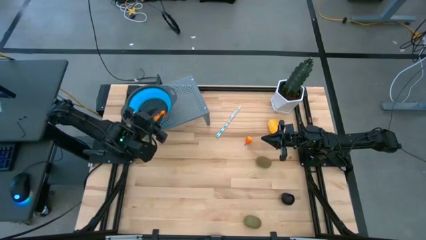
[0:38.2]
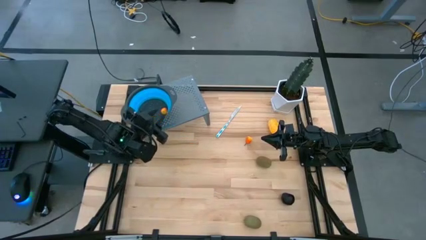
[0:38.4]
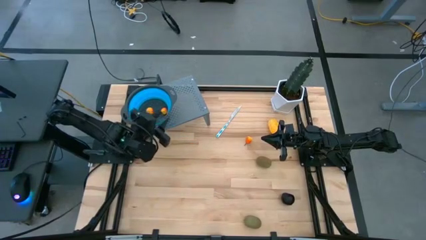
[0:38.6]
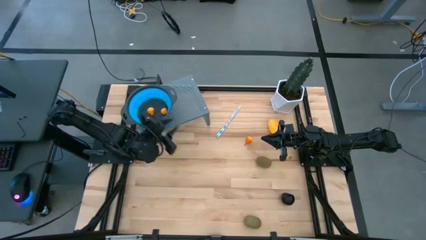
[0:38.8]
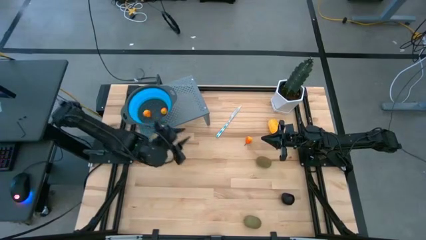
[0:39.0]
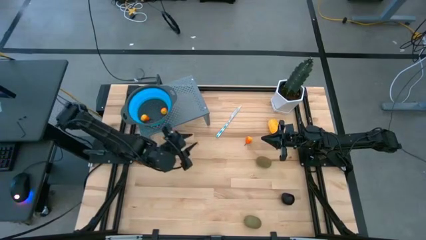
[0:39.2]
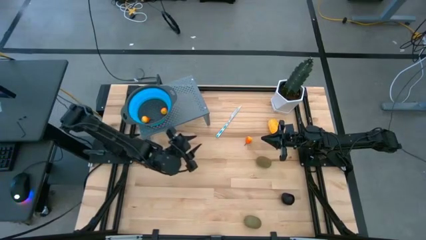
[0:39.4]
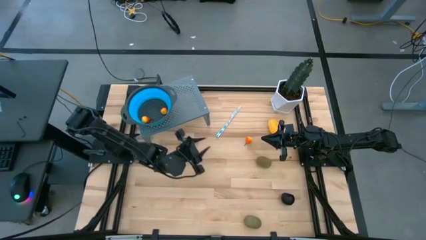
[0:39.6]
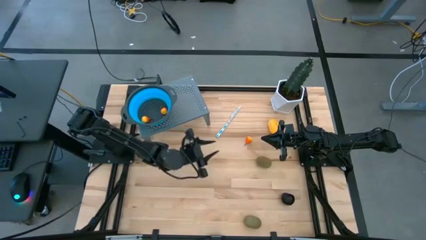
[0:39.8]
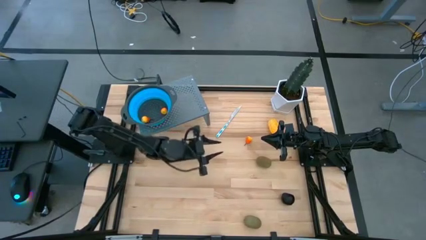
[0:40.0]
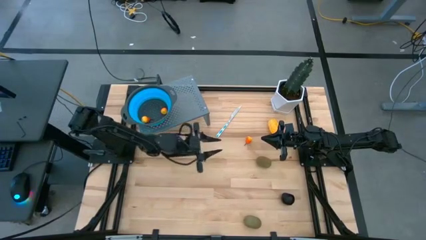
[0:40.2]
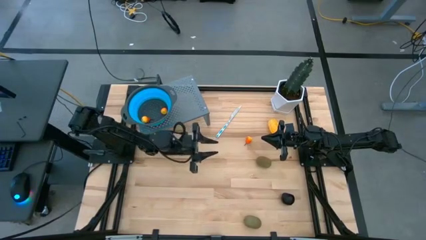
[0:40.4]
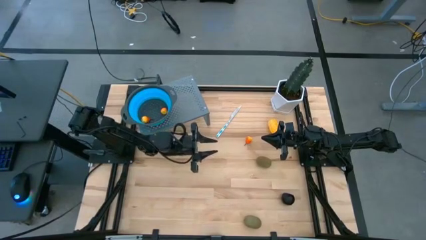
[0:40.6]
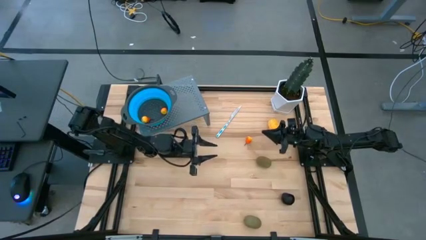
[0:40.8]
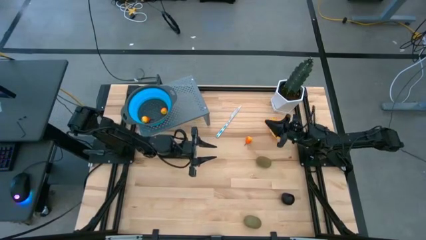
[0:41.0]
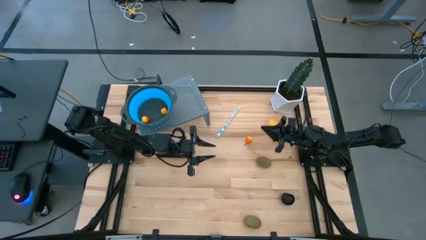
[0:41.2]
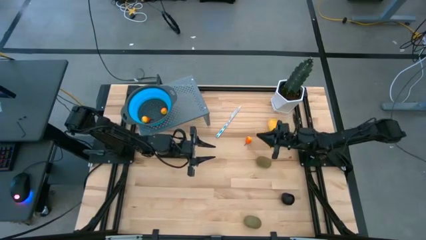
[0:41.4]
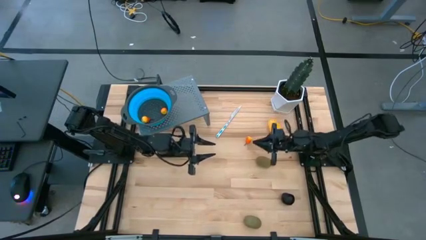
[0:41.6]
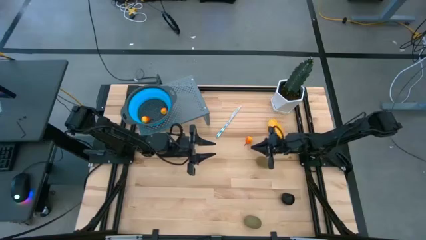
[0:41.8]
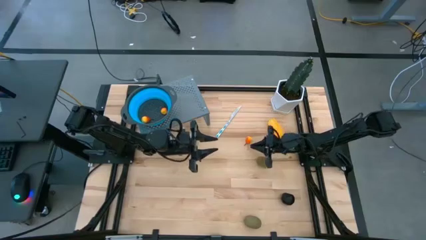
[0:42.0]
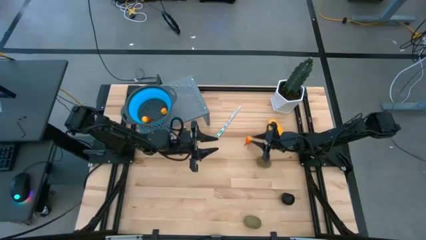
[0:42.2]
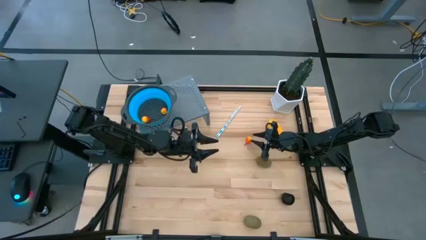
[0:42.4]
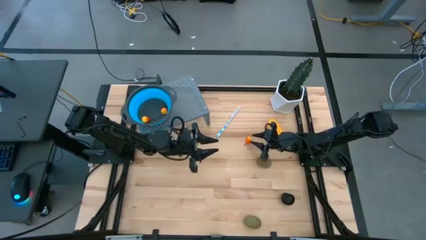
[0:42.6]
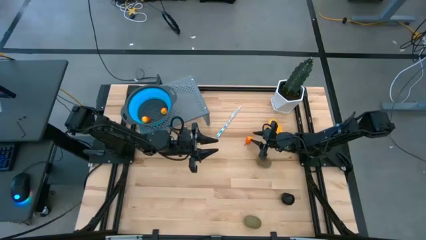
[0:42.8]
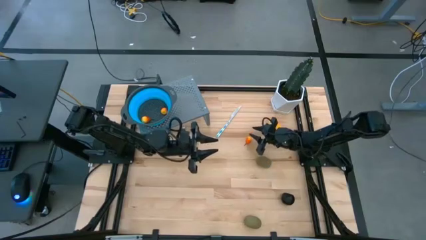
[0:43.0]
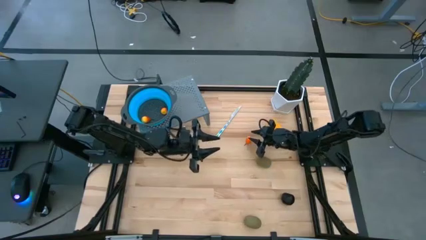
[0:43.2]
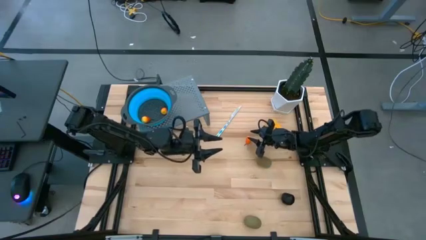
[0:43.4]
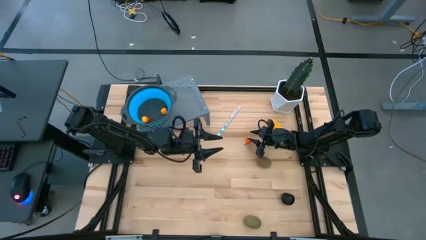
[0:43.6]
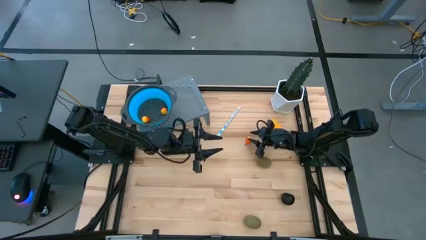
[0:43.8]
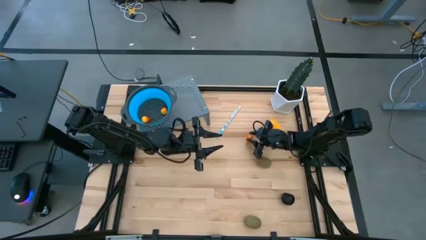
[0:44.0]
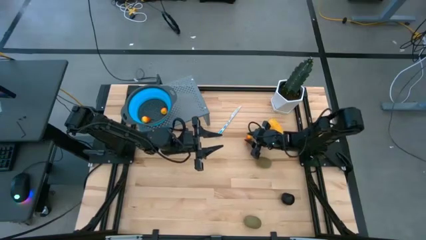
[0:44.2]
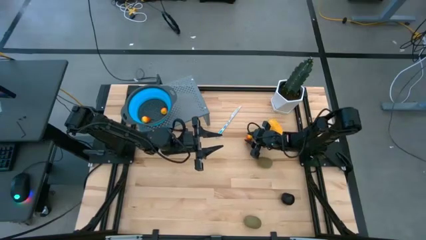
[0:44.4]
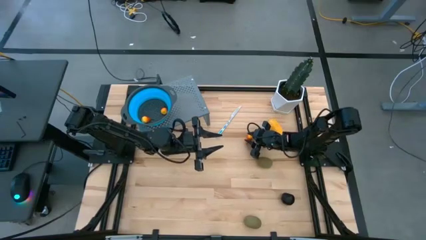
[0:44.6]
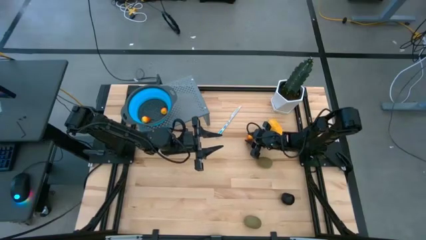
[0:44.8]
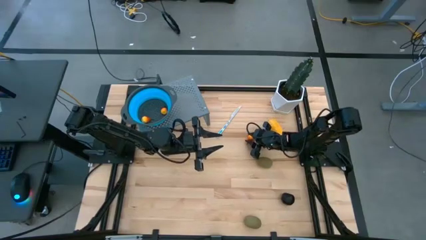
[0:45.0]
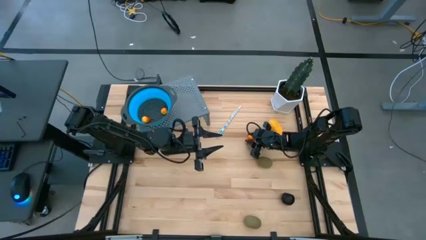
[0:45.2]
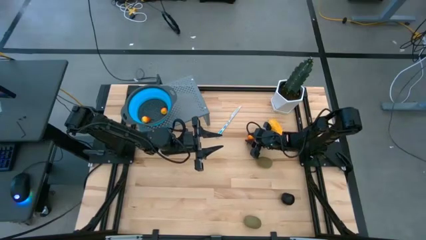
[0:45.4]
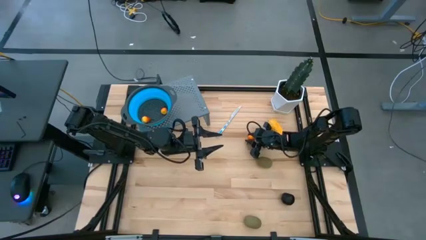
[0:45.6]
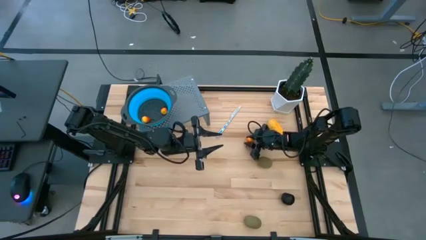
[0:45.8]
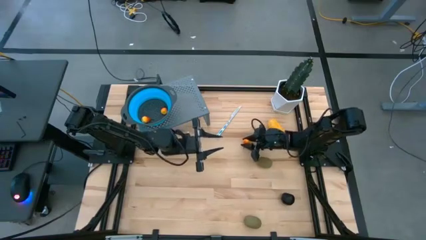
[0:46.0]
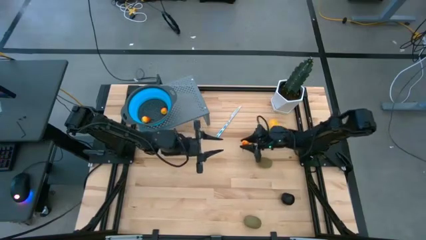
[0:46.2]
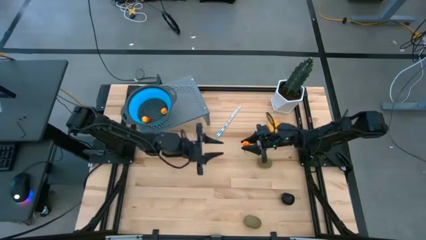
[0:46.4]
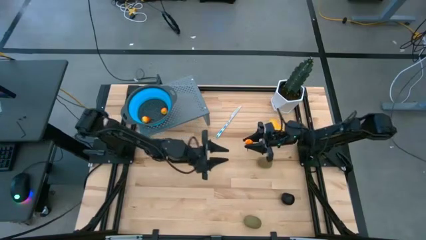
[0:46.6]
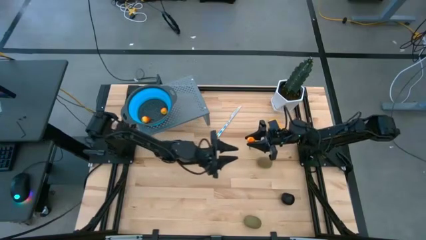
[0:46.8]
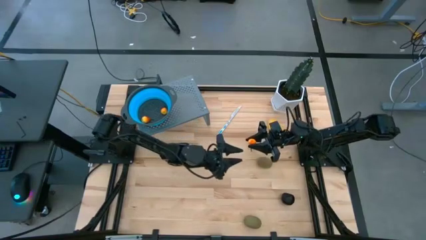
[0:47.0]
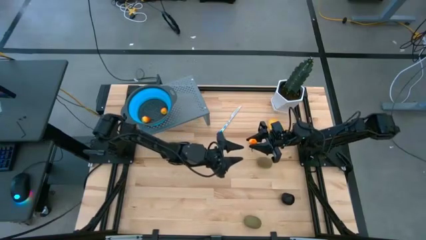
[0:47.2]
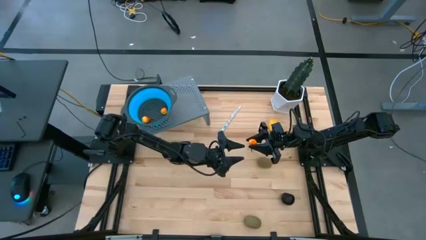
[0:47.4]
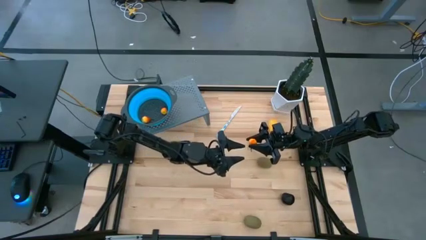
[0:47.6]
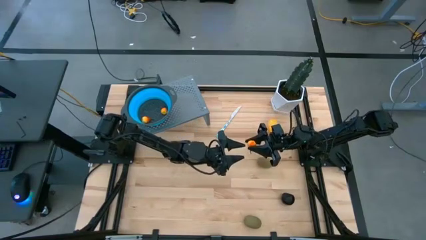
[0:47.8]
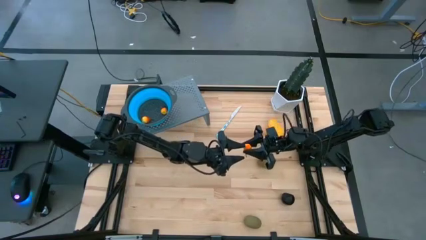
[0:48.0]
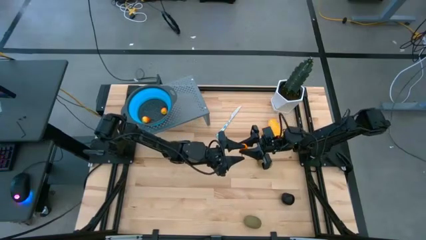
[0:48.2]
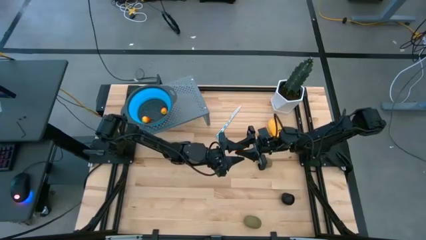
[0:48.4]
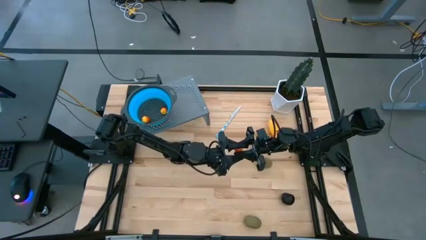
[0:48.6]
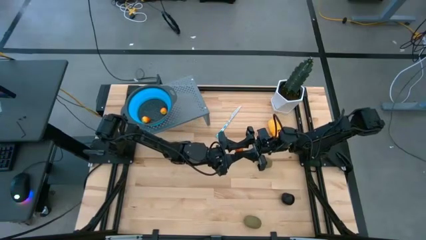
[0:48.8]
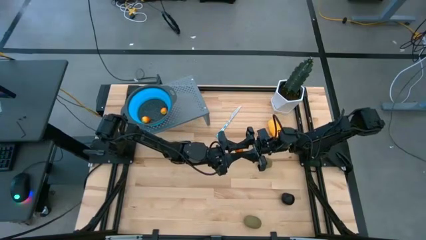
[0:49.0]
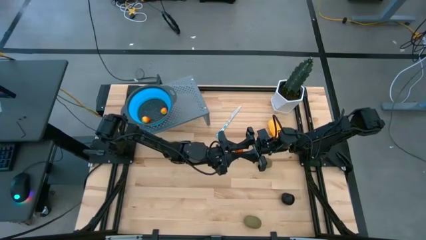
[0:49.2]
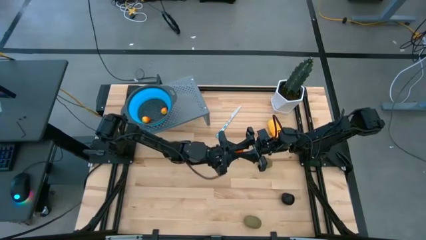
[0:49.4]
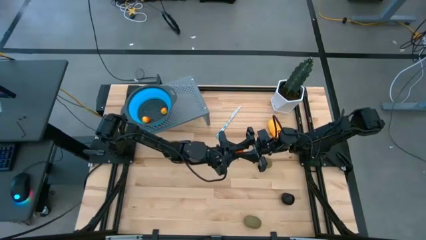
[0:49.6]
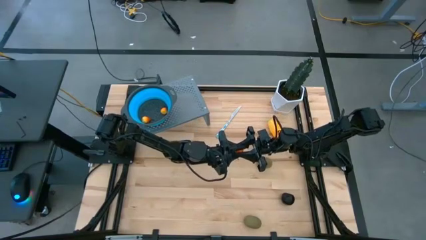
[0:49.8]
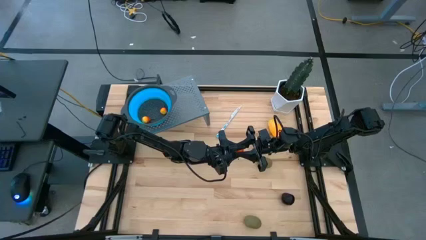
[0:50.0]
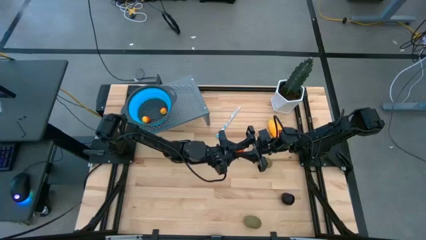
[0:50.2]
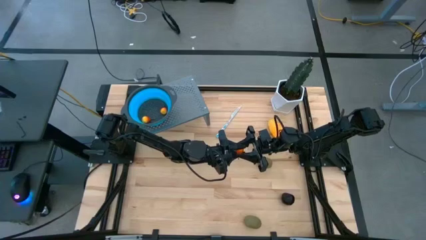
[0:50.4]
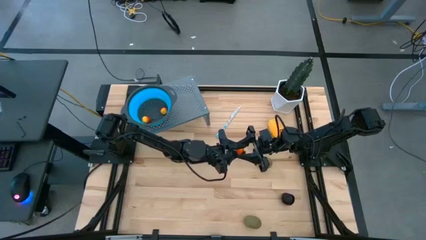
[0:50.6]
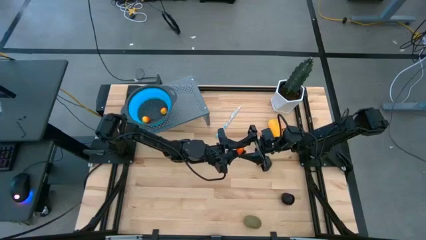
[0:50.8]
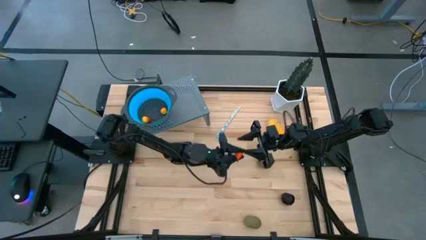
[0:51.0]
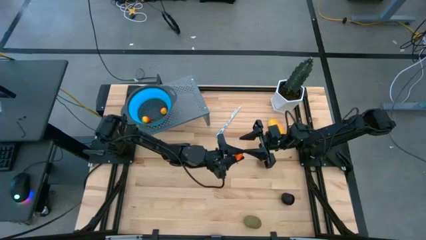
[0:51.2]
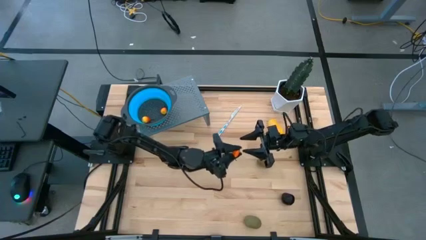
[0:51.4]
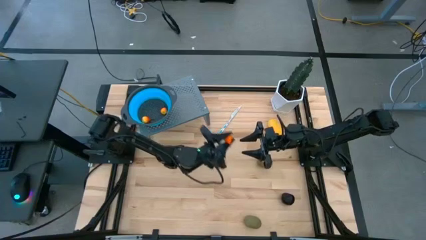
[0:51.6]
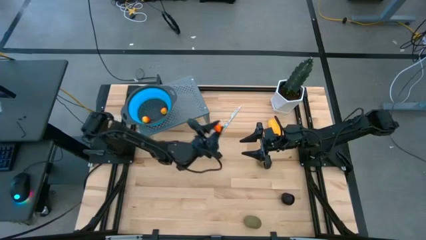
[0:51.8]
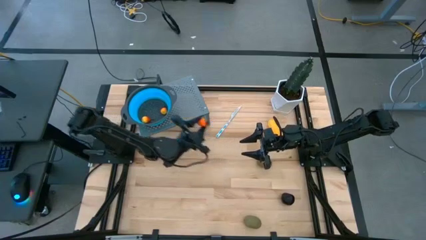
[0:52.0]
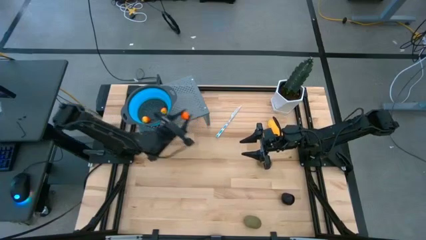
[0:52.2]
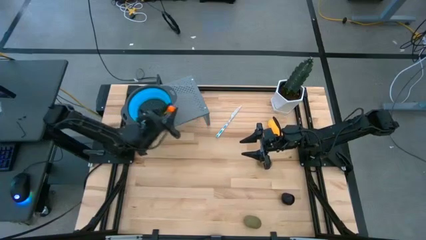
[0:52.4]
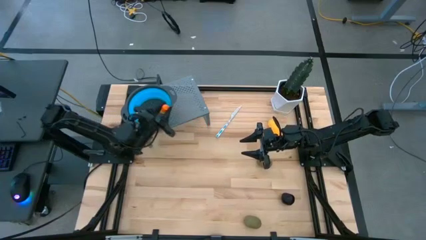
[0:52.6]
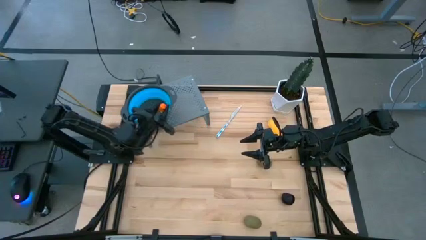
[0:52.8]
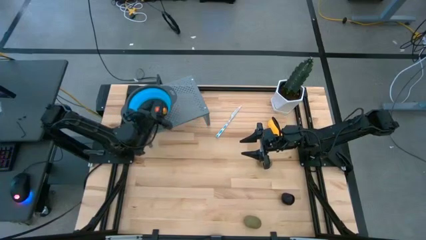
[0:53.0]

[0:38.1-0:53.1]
Task: Pick & Place Fruit
Put the right orange pear into the blue strainer bowl

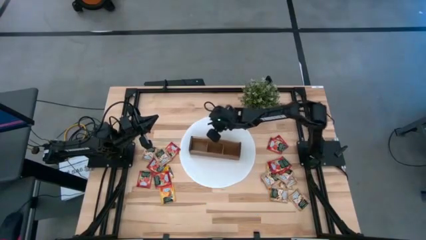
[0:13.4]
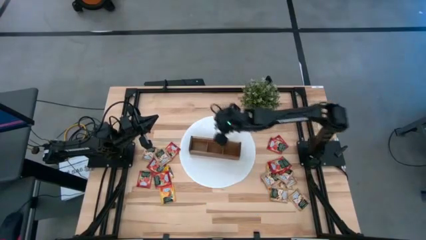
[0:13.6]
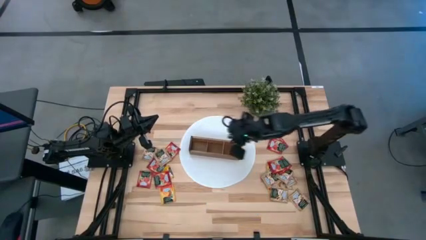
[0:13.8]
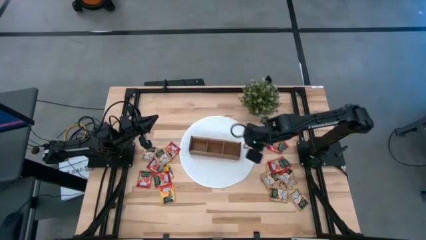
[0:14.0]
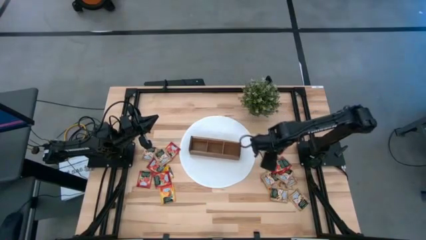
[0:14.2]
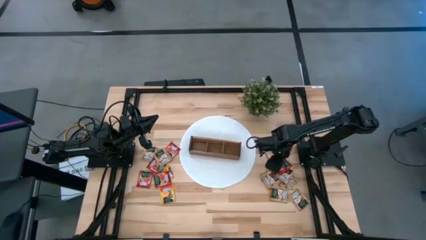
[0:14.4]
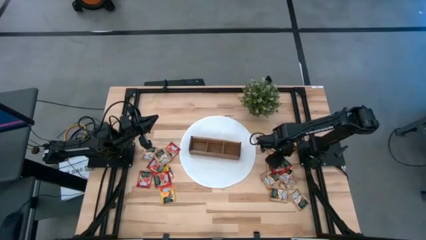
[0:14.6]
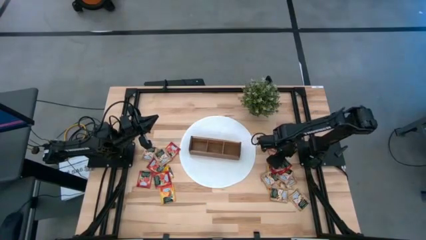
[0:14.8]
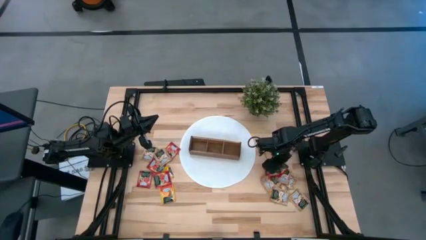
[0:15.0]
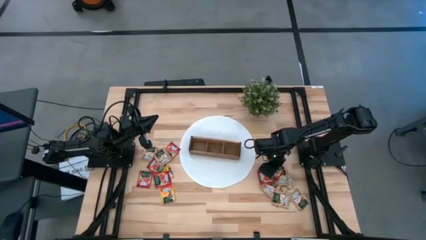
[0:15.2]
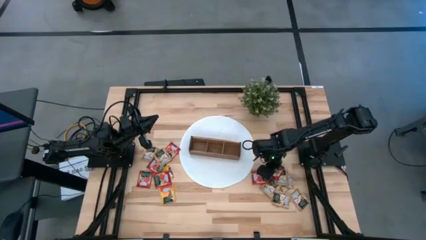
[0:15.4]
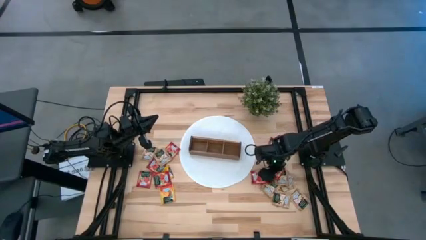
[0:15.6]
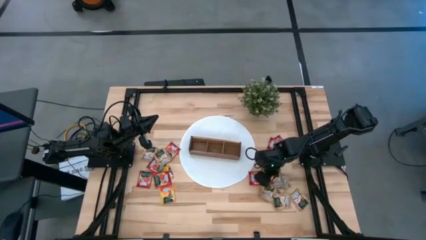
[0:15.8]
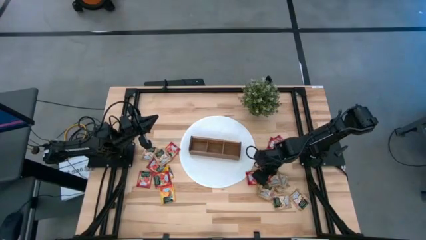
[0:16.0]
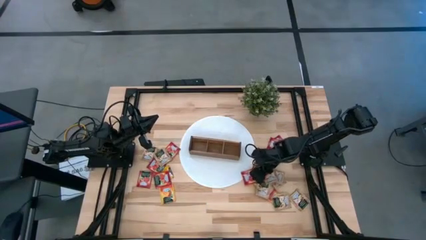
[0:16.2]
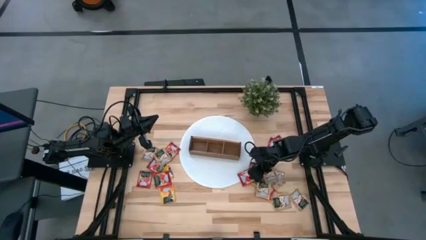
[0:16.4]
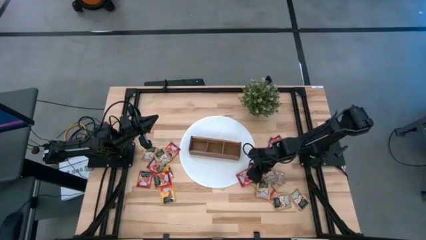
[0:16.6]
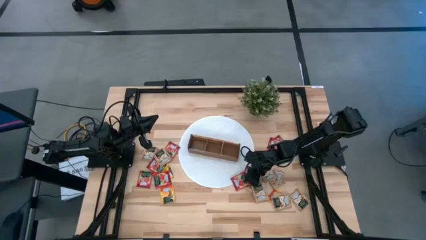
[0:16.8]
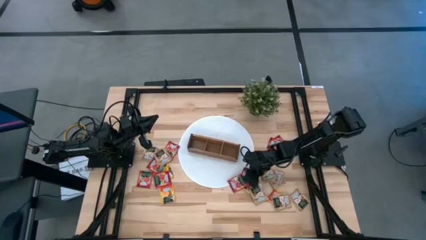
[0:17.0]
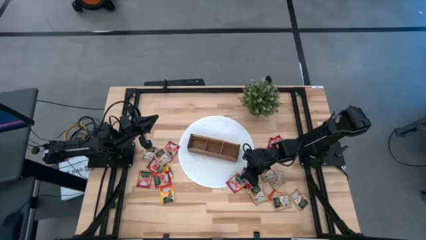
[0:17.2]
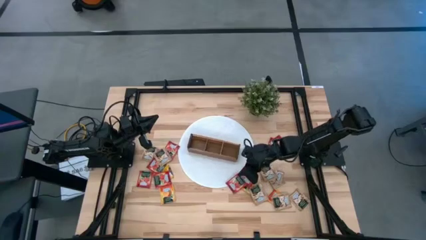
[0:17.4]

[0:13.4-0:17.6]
Task: Pick & Place Tea
Put the red tea bag into the middle section of the wooden organizer
